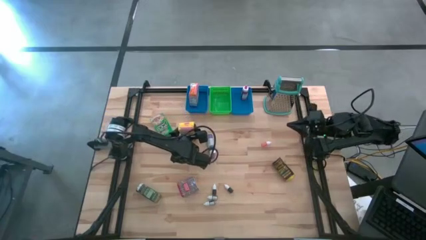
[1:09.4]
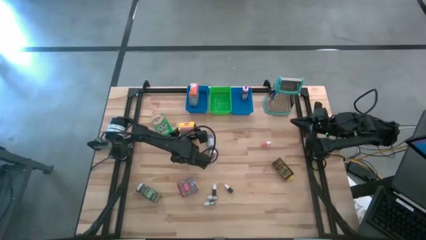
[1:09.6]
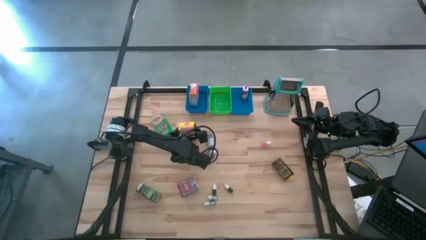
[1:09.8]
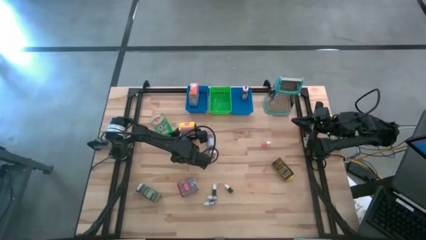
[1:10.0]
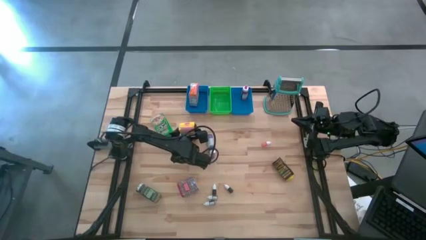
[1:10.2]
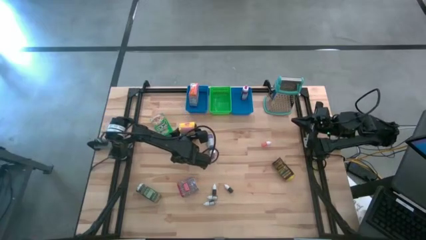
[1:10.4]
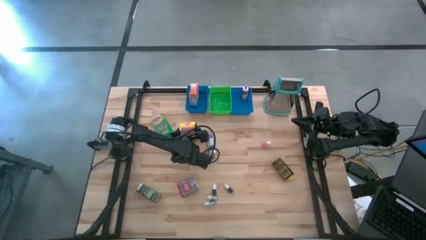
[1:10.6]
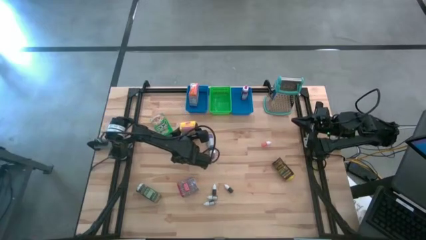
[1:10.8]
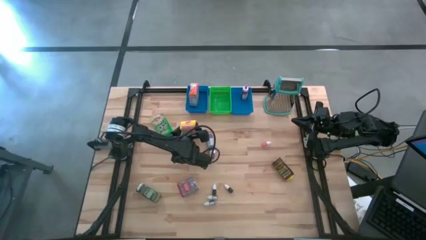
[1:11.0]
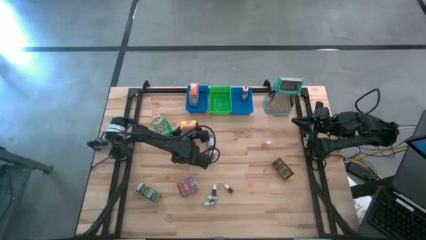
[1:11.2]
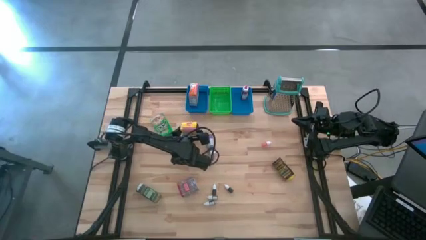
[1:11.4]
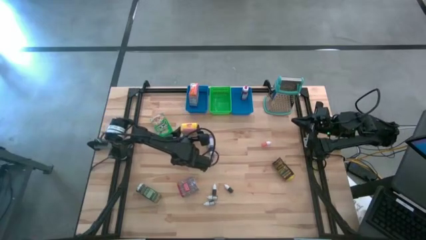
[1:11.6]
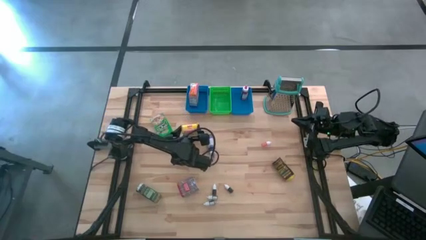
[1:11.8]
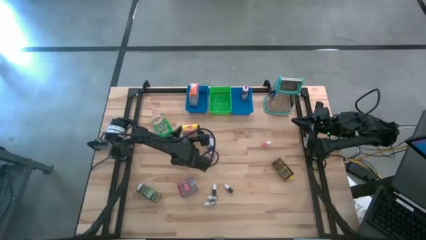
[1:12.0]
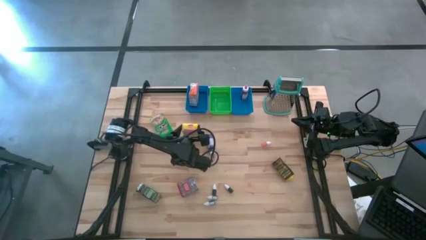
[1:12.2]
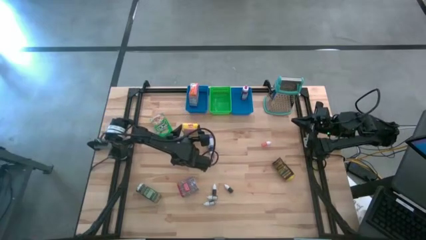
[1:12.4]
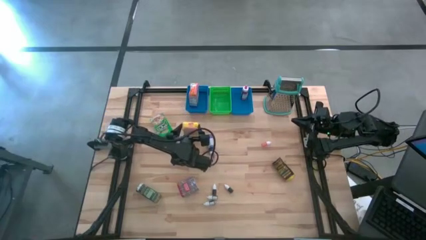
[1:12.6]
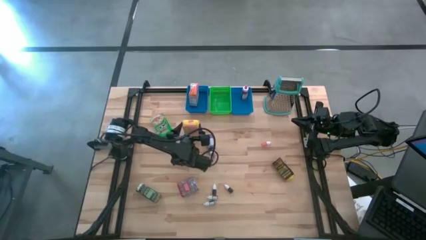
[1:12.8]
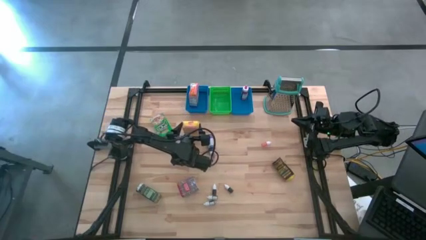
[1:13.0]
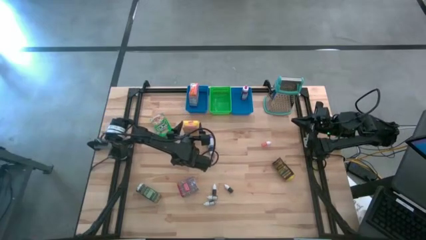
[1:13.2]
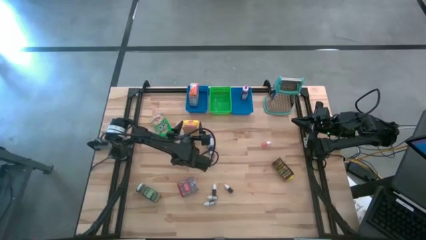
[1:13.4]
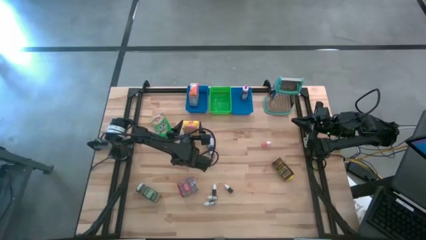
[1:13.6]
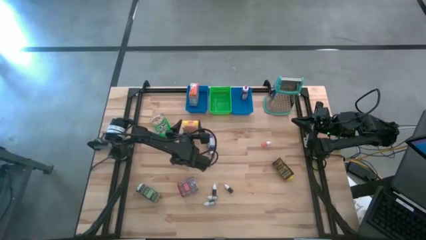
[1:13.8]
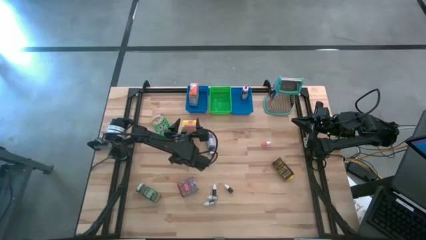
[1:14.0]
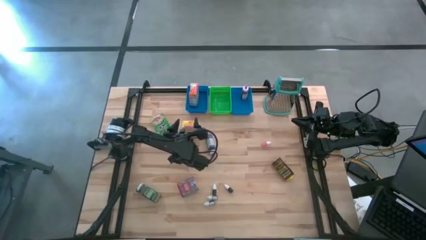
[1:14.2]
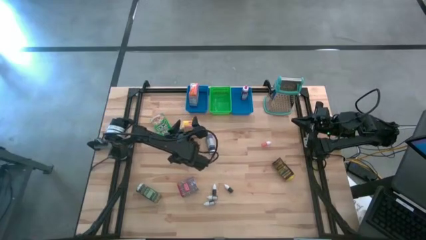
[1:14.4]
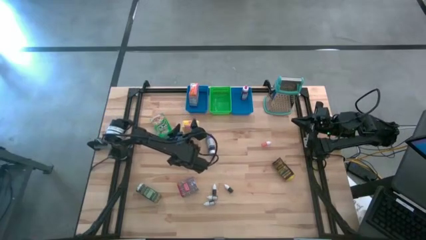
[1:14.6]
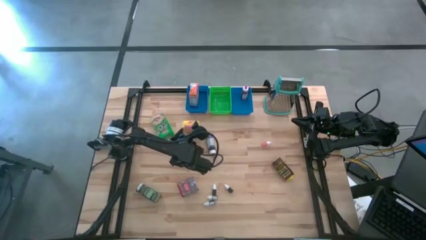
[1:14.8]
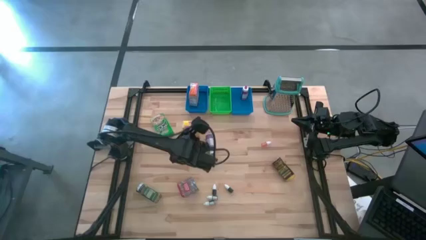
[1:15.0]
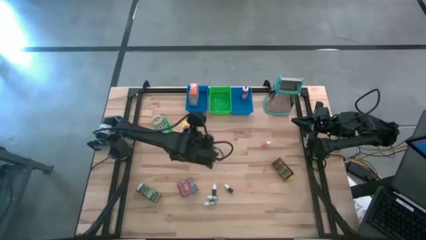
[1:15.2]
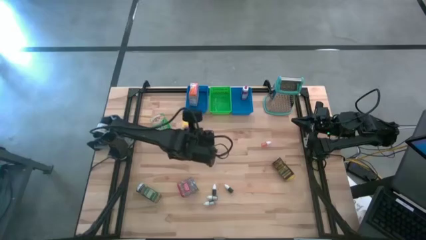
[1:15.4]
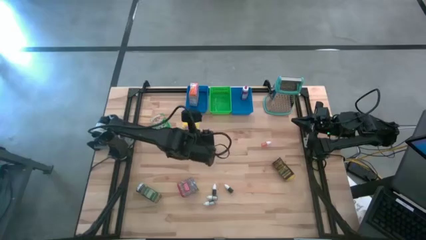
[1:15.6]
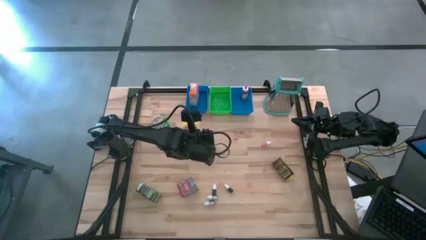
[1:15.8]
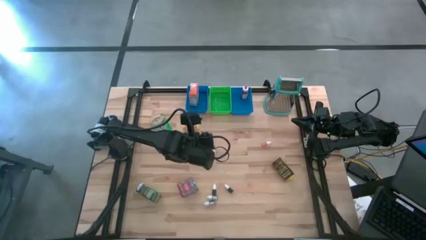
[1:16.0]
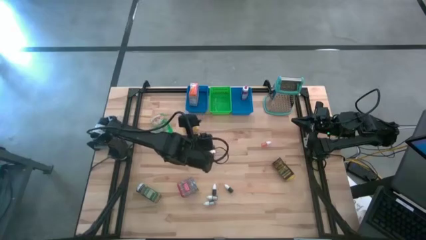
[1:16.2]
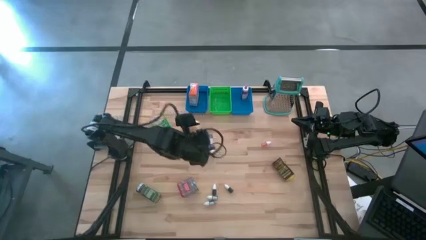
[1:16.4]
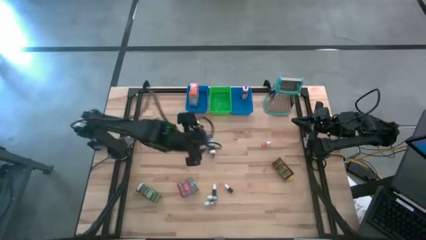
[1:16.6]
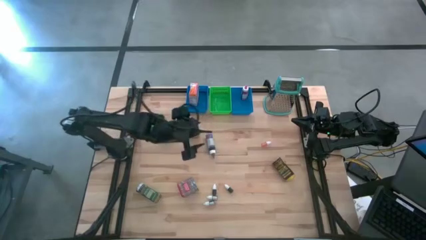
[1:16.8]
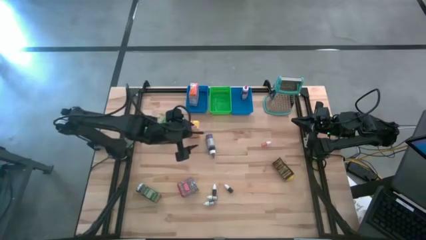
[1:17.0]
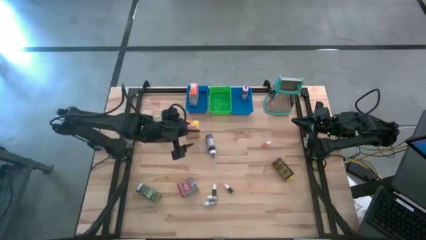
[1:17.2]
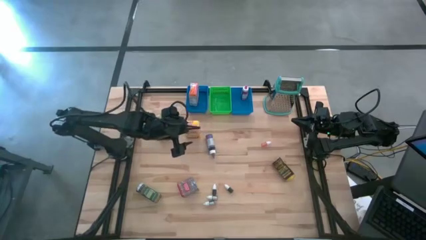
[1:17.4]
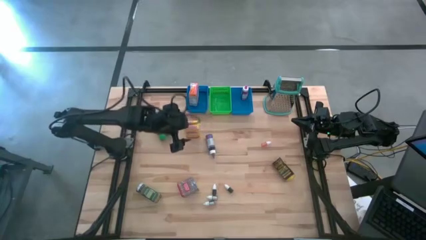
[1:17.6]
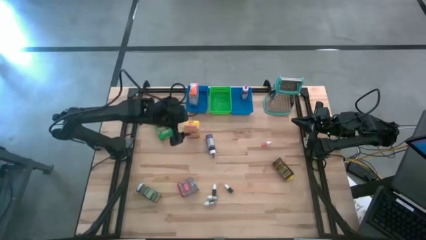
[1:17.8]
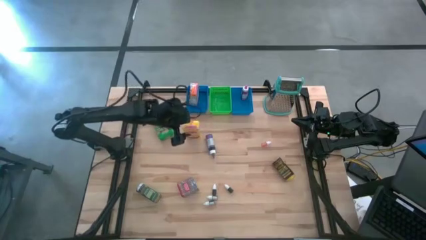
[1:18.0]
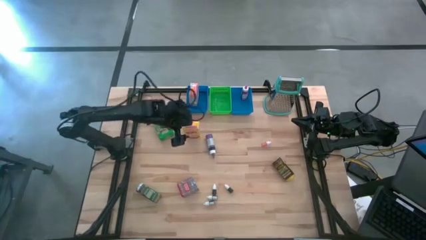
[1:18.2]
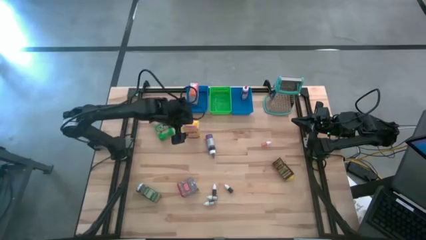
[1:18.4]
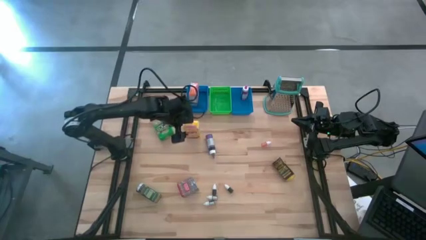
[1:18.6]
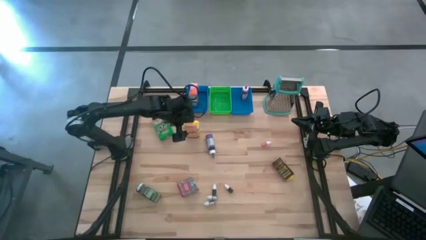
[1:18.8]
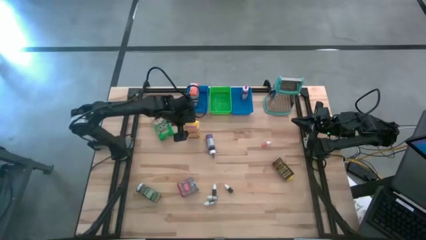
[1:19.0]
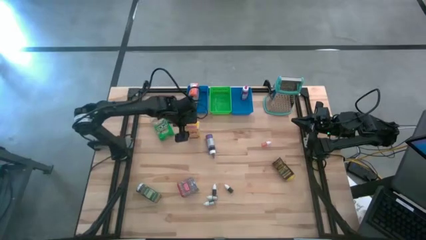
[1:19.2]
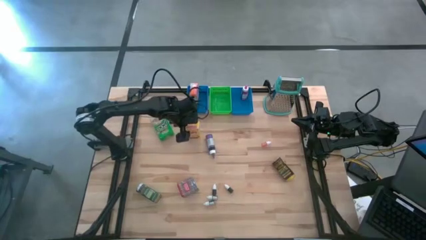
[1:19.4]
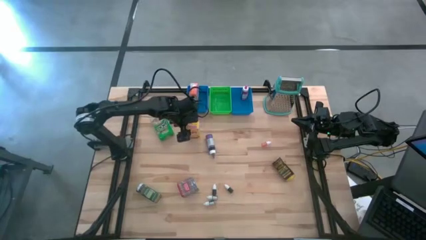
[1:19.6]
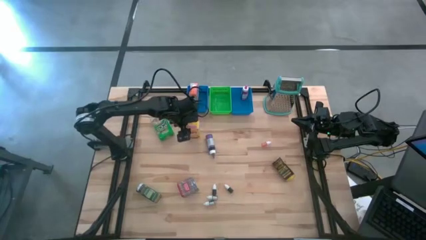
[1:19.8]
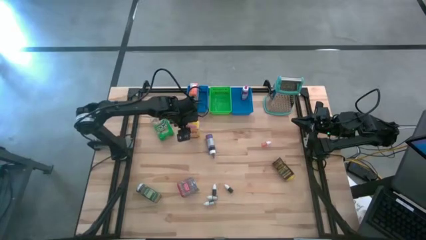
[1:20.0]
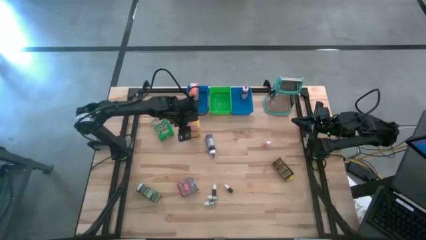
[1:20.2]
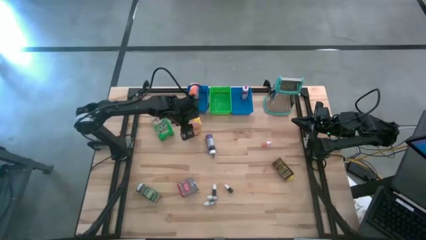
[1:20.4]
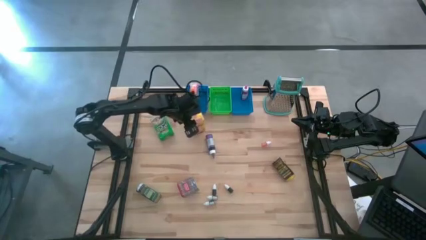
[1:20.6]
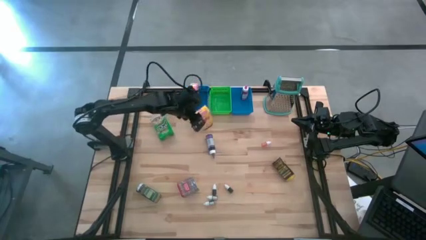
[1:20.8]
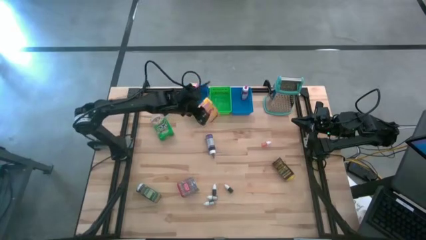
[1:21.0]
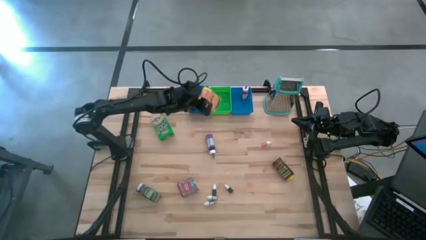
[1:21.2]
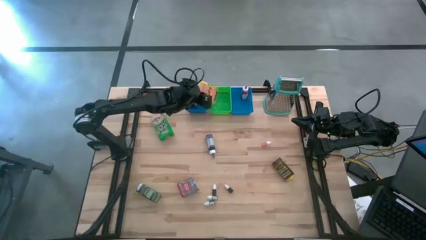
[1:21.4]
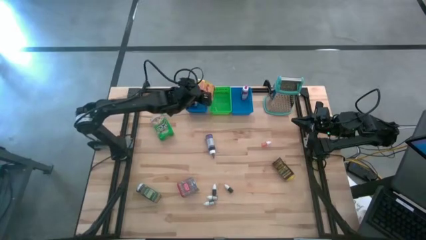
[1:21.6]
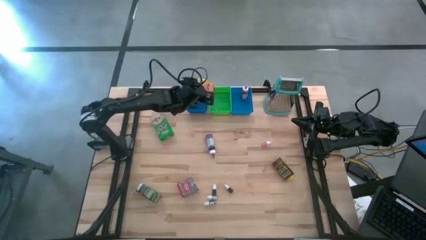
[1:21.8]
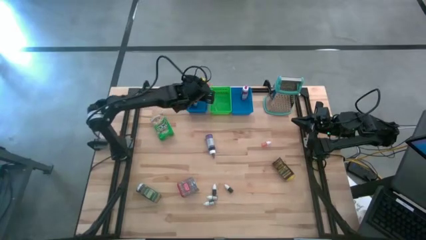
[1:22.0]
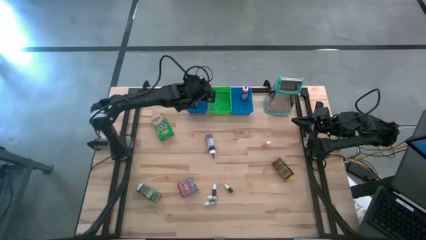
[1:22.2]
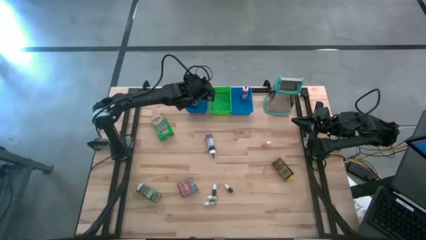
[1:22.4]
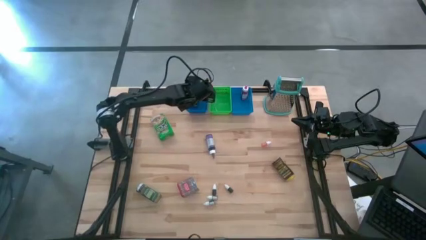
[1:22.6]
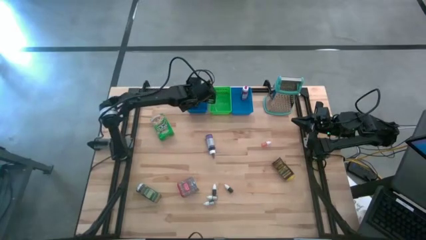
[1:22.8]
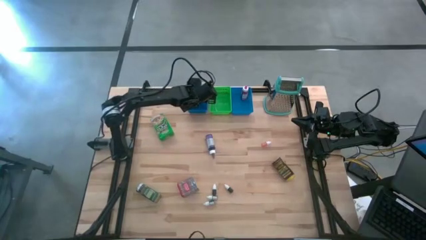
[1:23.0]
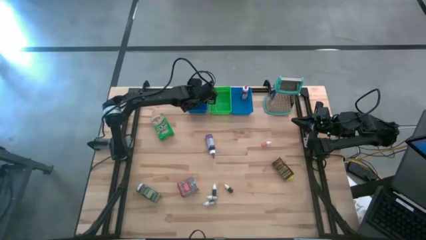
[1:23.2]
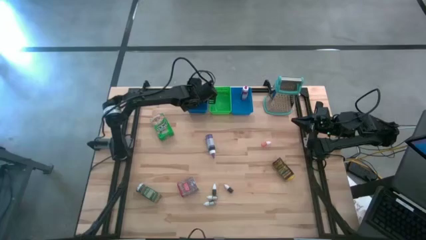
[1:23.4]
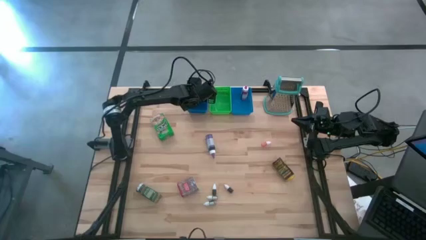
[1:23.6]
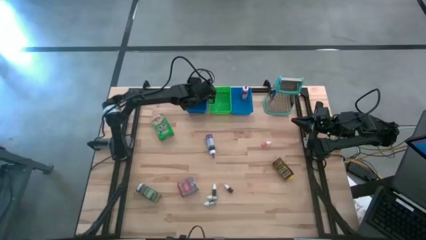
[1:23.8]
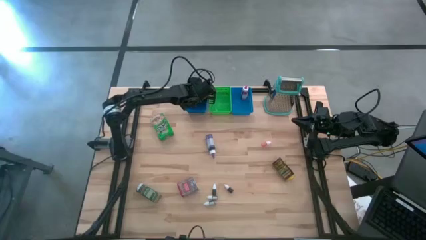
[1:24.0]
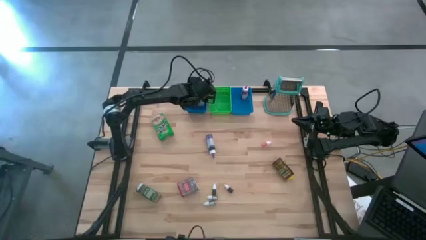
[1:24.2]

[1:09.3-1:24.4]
Task: Pick & Place Kitchen Items
Put the yellow cereal box into the left blue bin

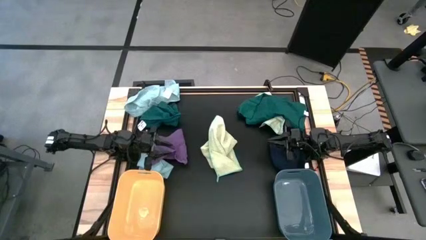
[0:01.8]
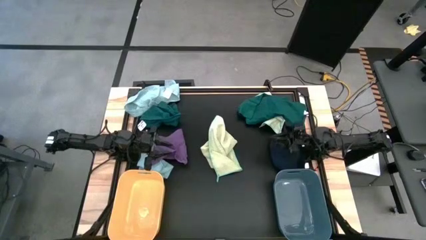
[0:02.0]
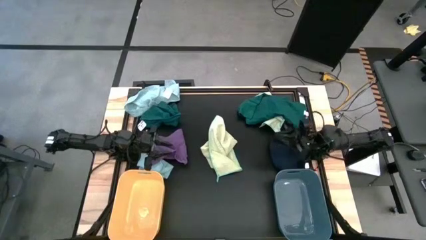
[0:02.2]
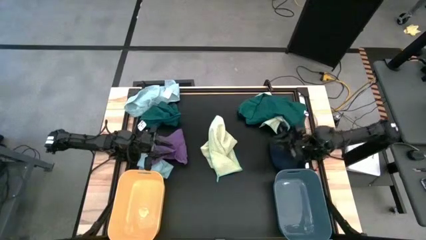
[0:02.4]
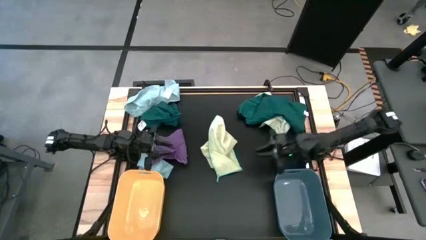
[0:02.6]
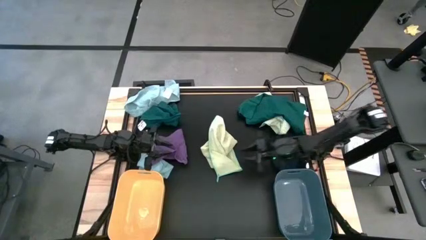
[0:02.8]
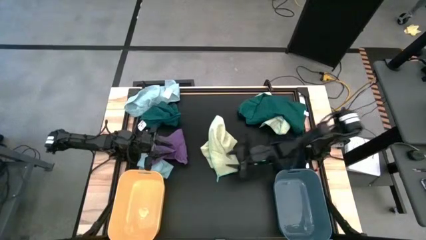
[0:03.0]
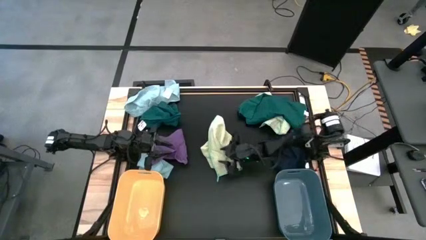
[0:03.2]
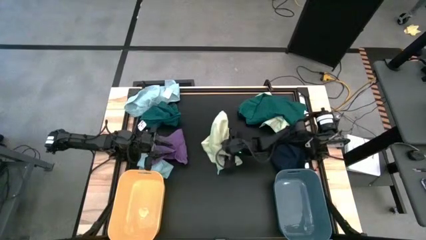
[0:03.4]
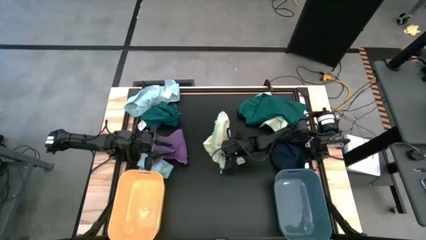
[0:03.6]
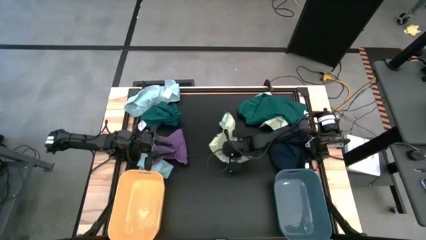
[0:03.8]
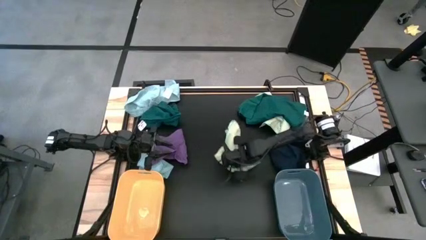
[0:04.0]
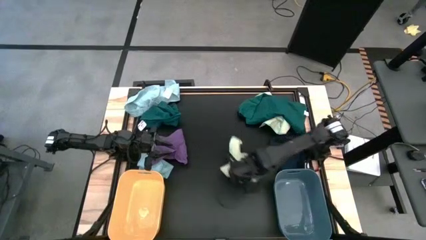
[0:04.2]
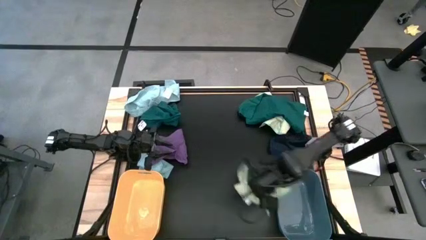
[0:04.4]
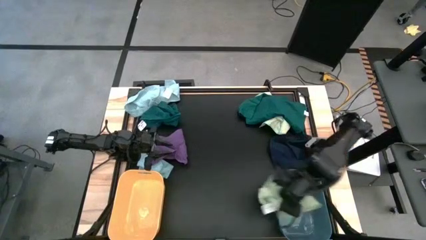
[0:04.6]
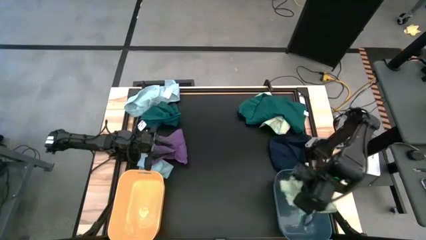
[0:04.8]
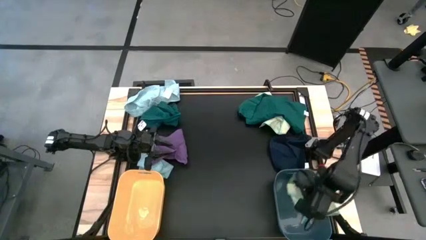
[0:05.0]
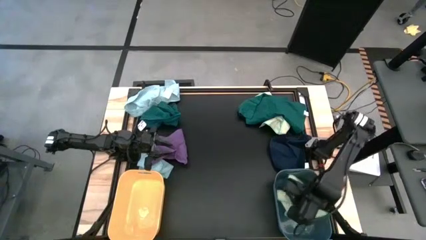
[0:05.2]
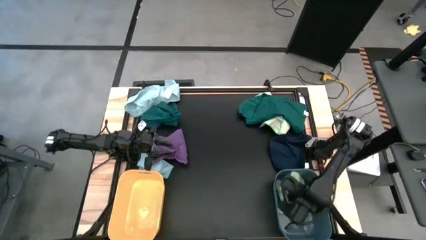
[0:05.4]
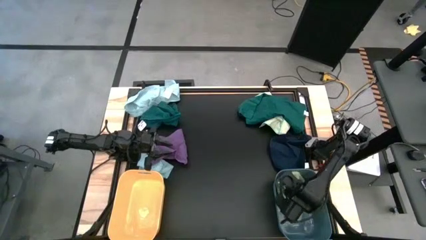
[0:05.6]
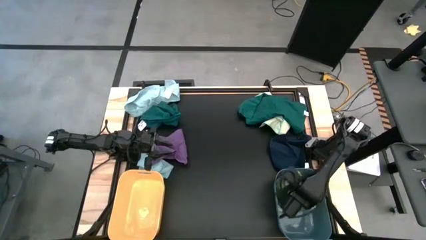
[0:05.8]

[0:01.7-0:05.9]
Task: Sort microfiber towel by color & place in baskets
Put the bottom light green microfiber towel into the blue bin
